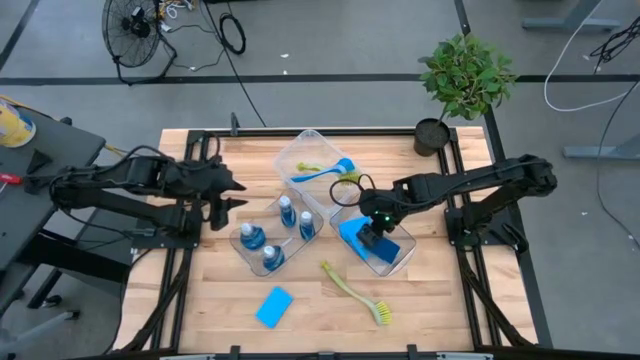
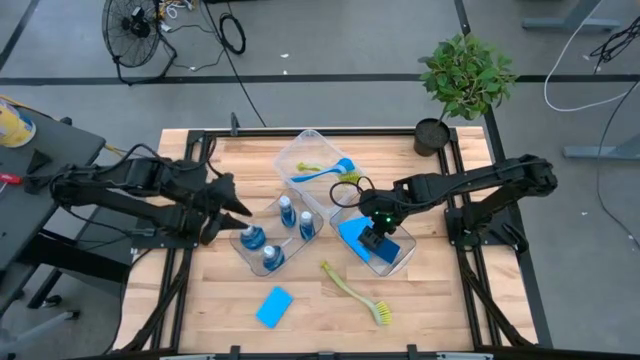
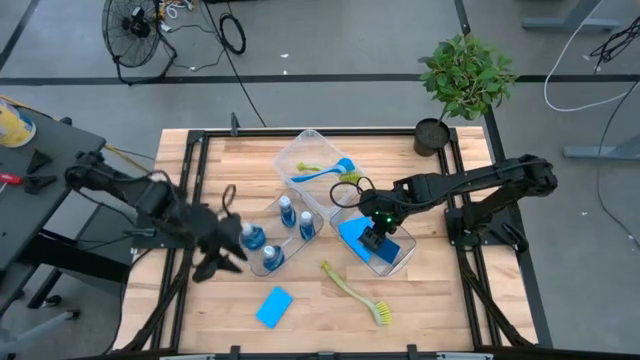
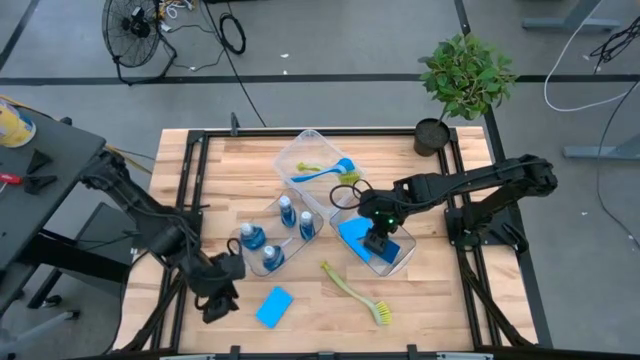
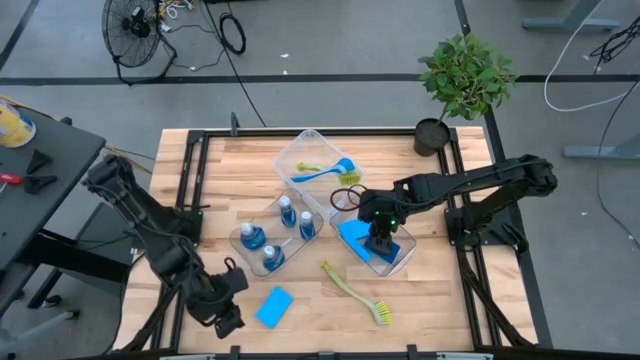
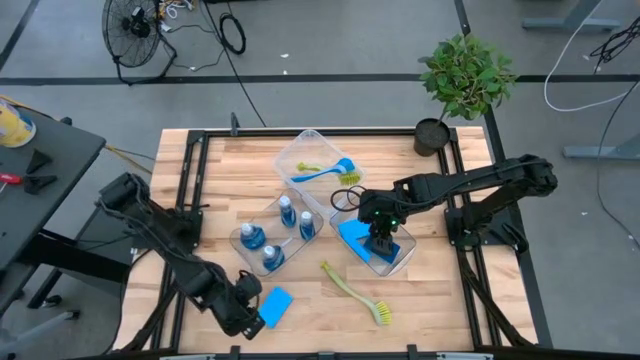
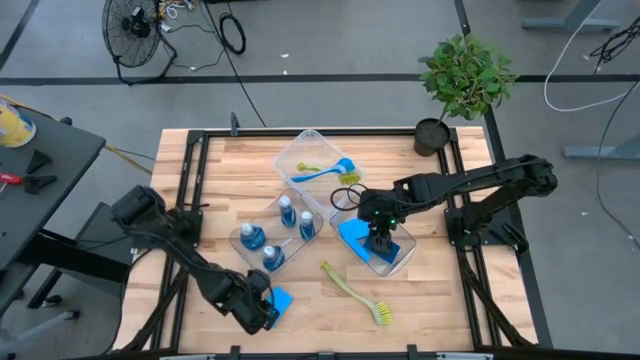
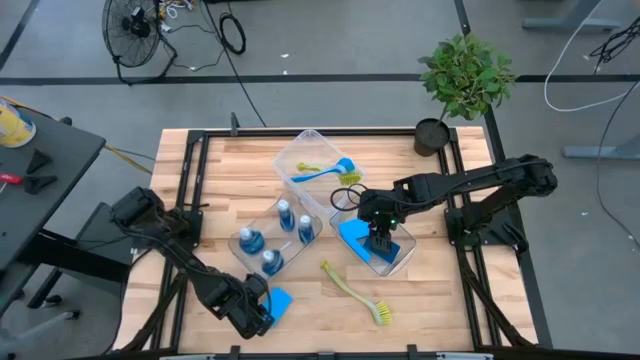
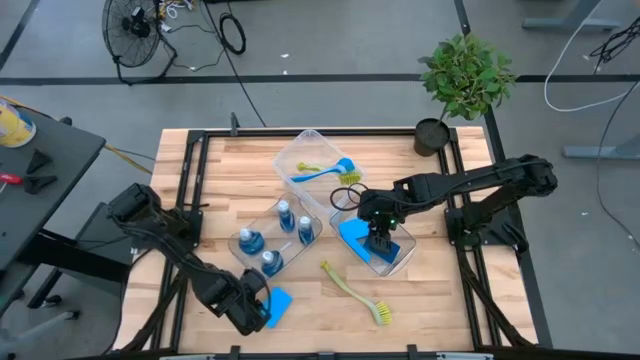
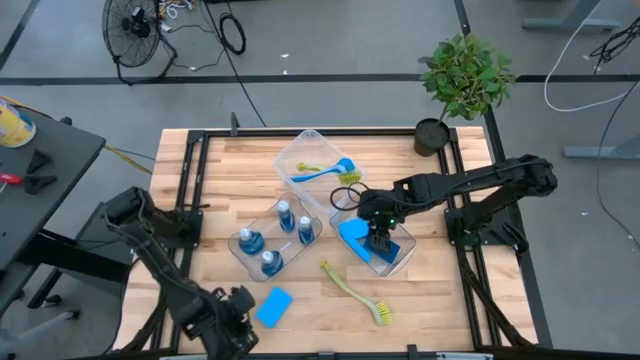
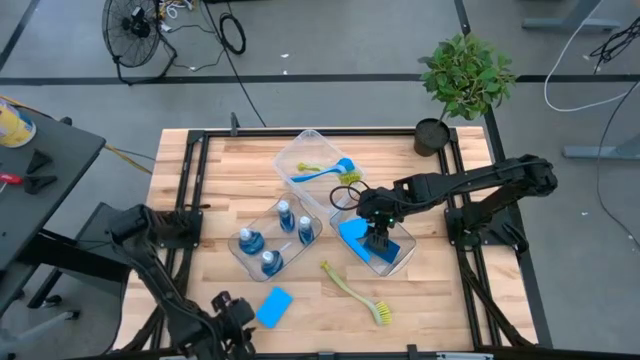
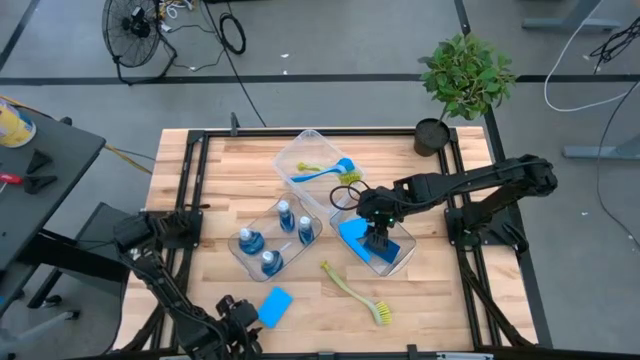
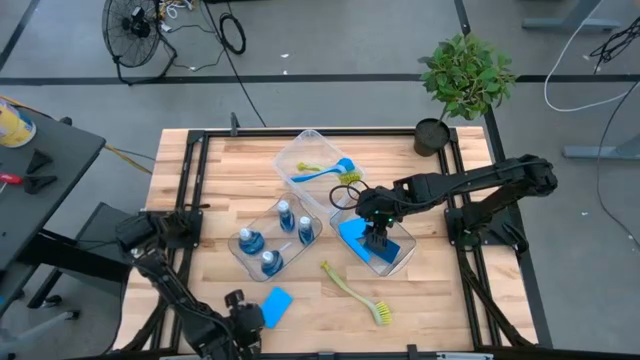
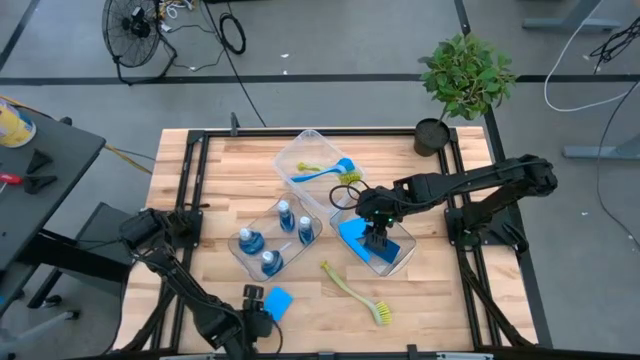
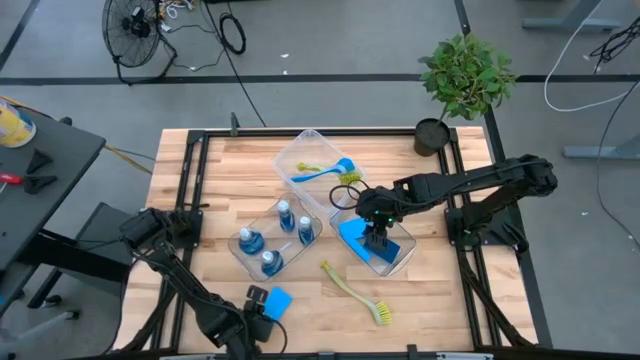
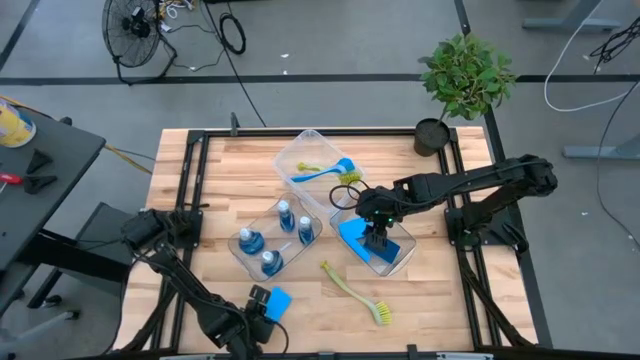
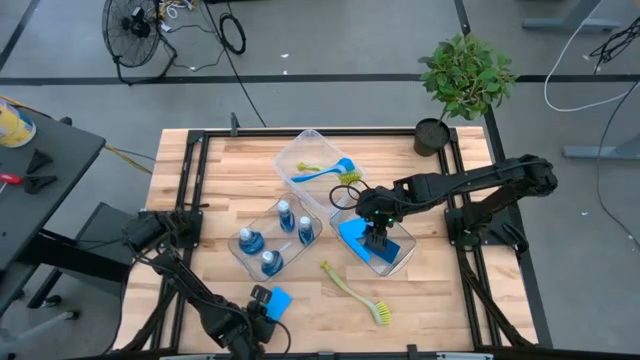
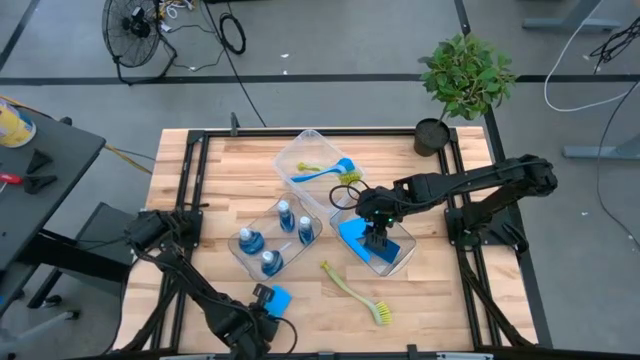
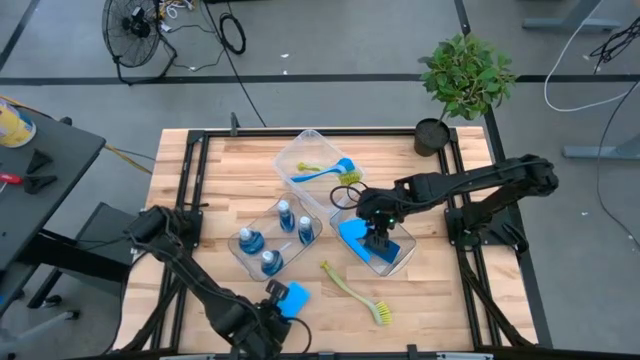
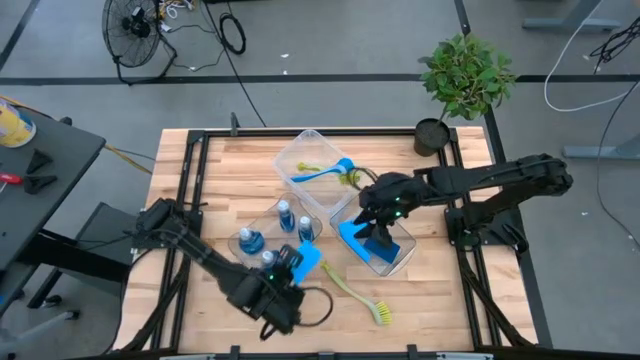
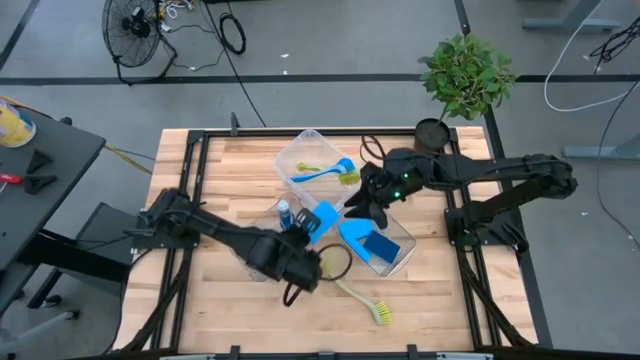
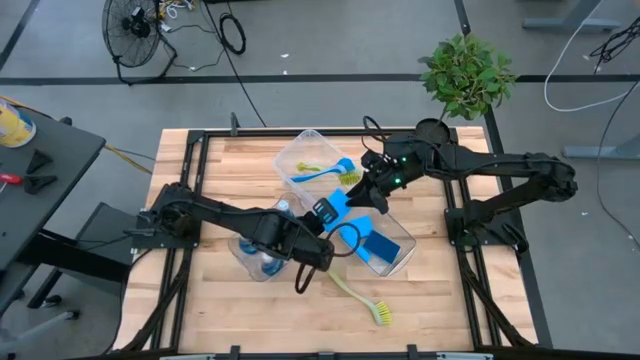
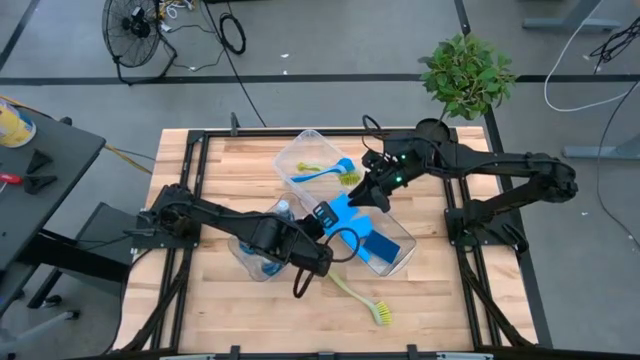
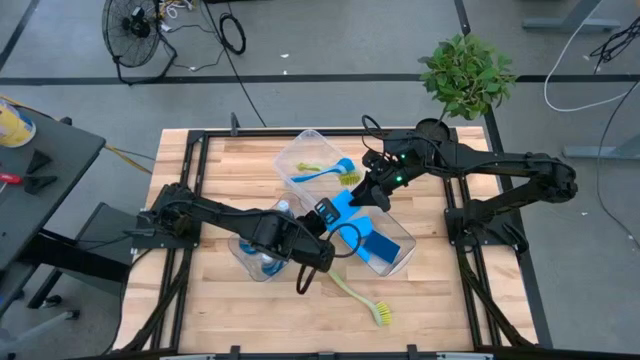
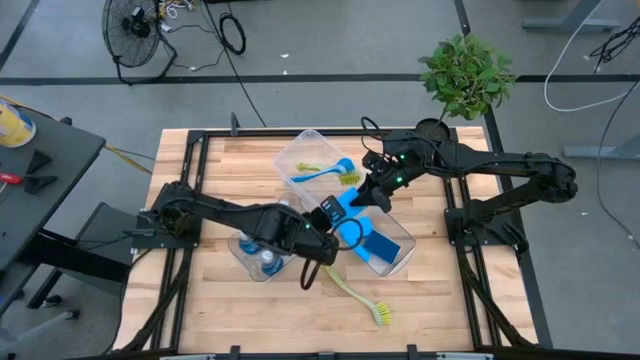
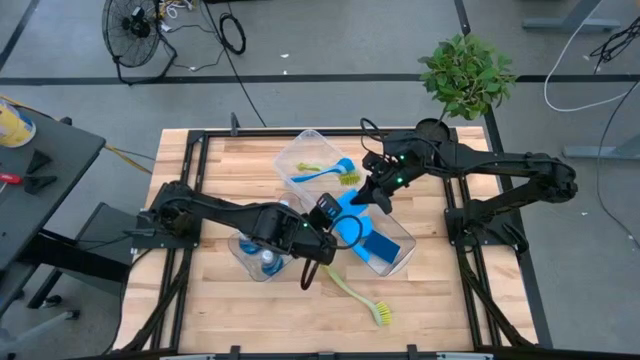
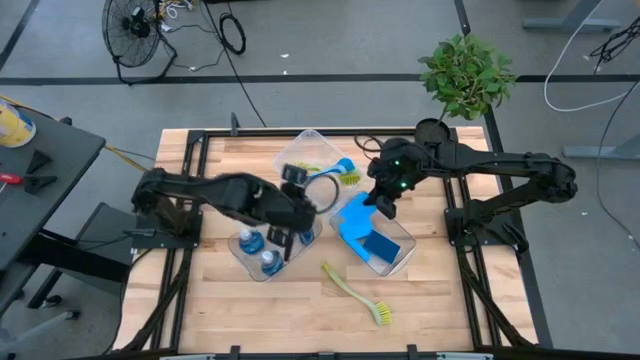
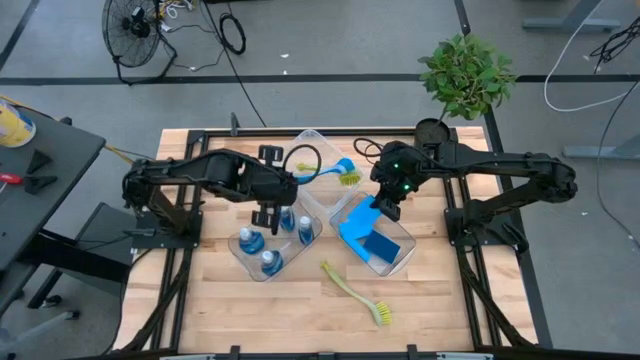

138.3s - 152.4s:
Task: Pick & Place Kitchen Sink Supplies
Put the blue sponge into the right transparent bin

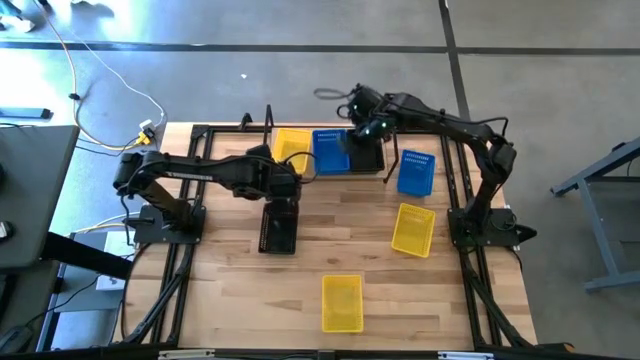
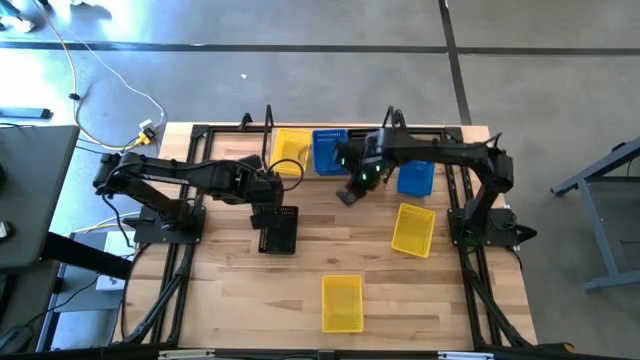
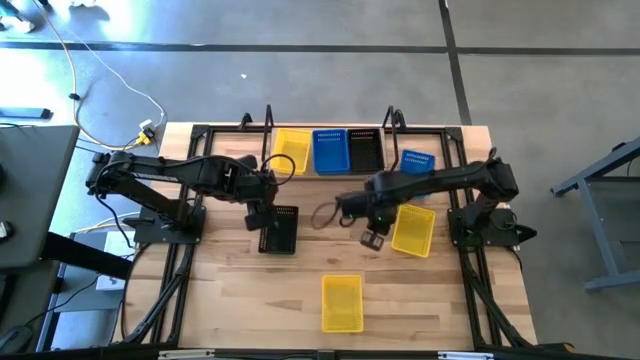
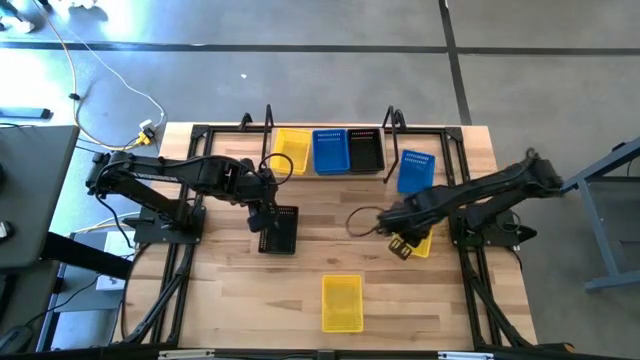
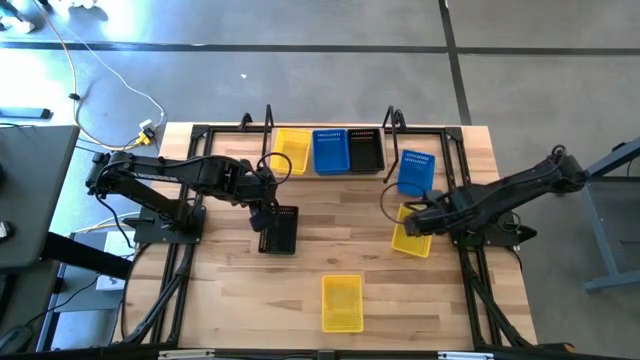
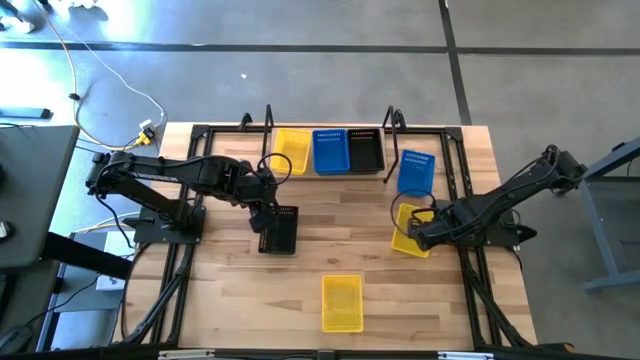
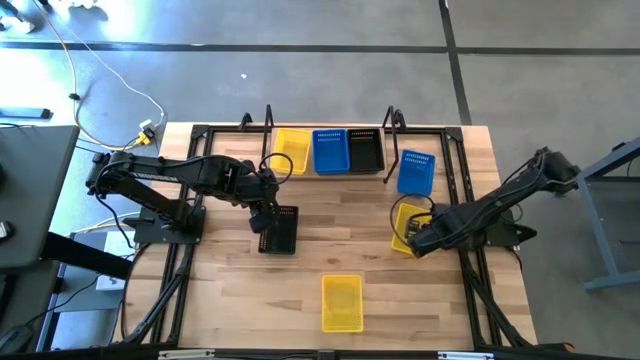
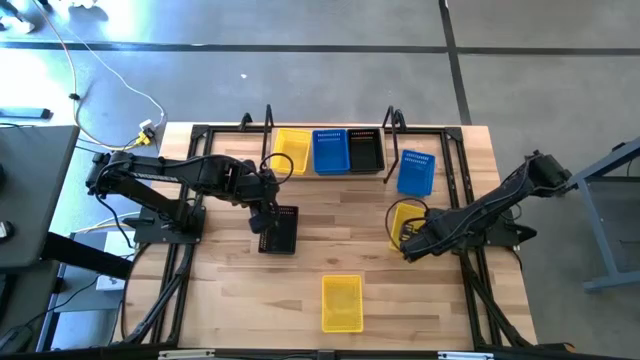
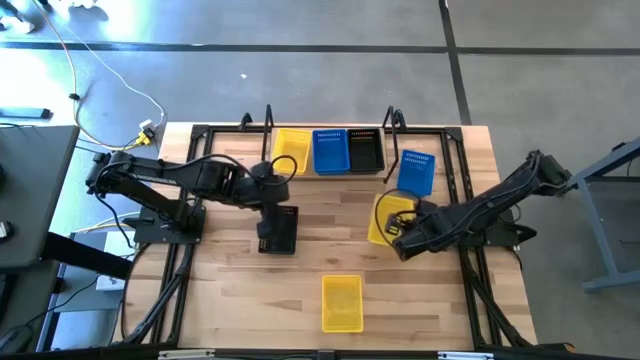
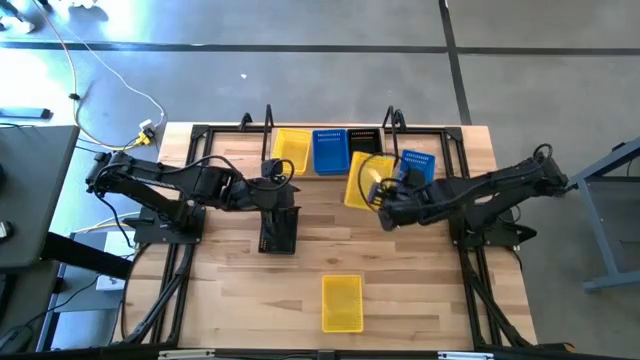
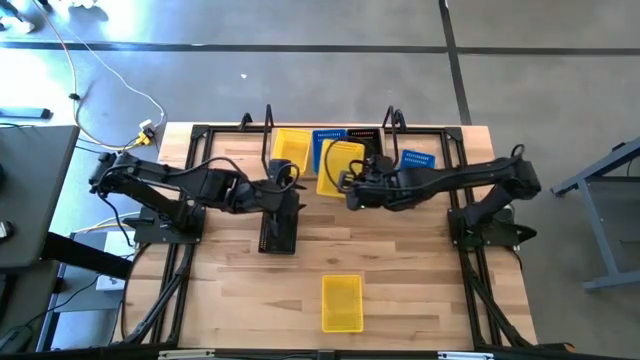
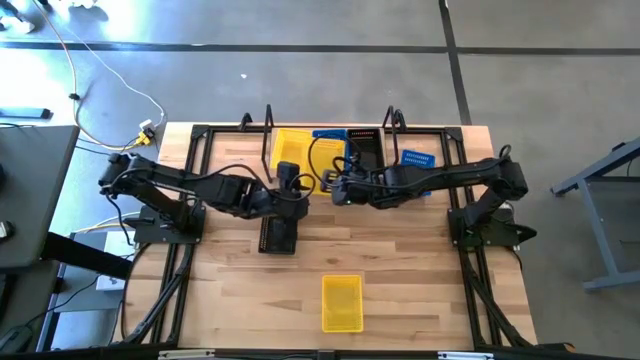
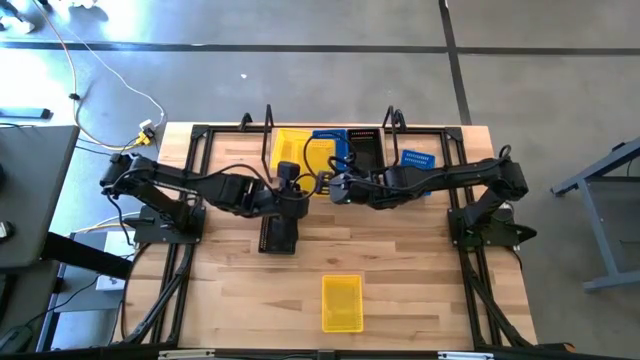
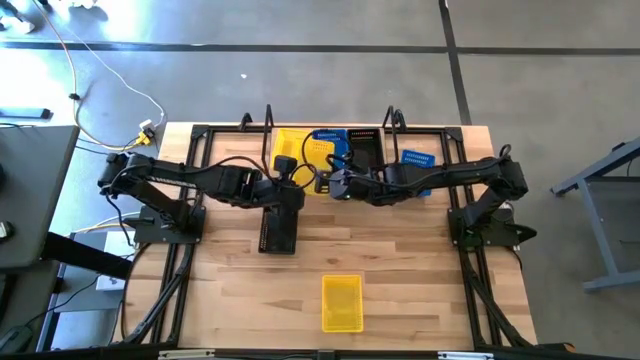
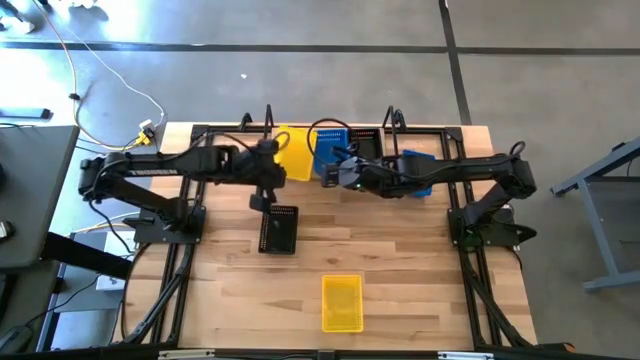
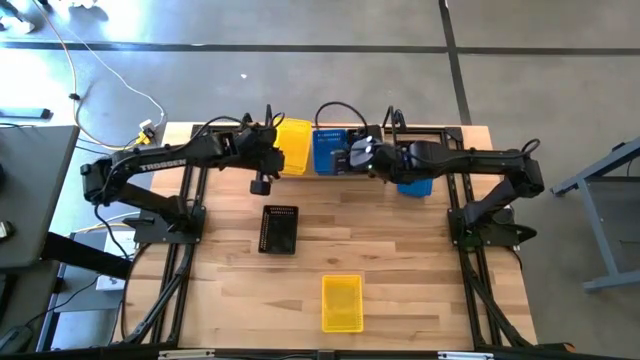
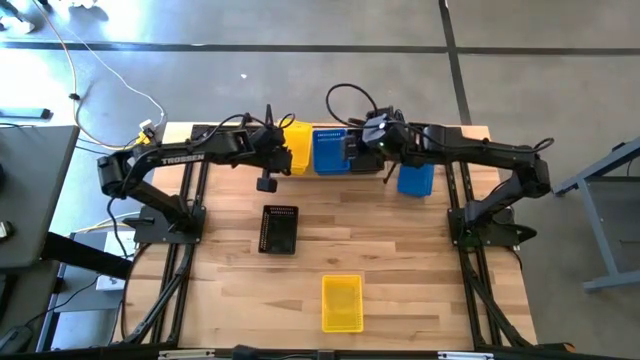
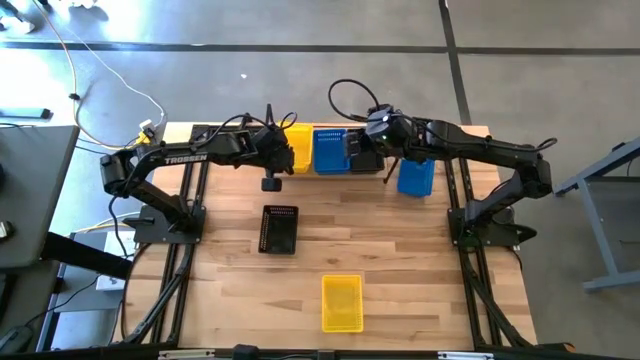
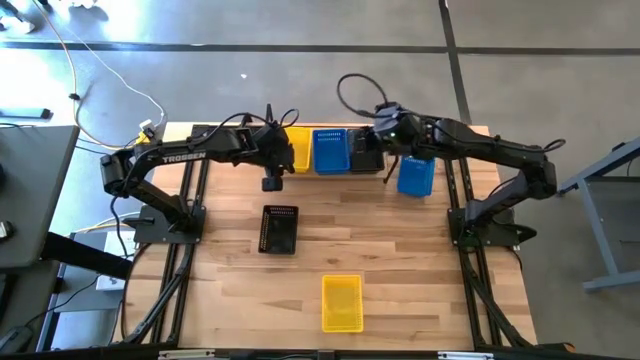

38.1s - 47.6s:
Task: Stack baskets on shelf by color
Stack the top yellow basket on the yellow basket on the shelf
